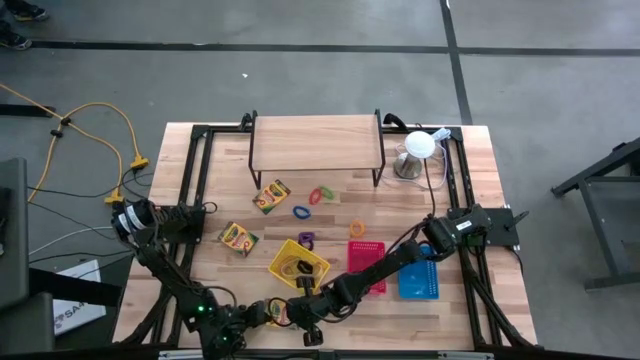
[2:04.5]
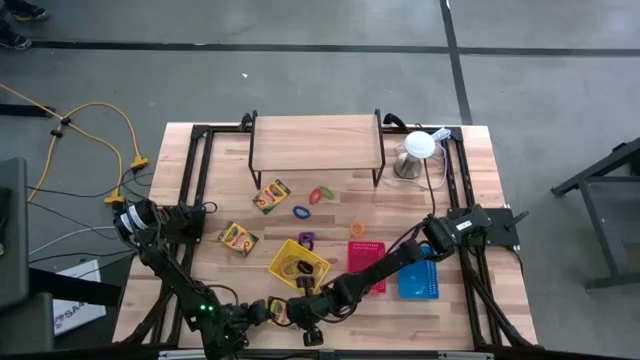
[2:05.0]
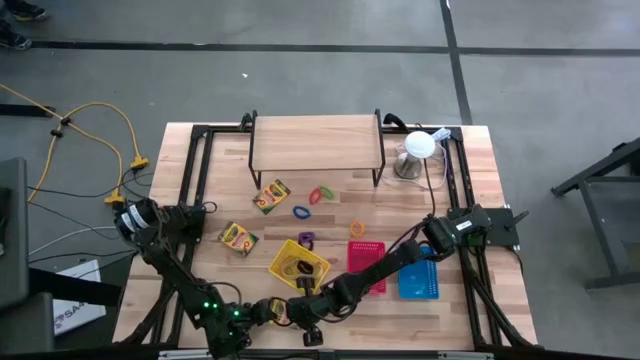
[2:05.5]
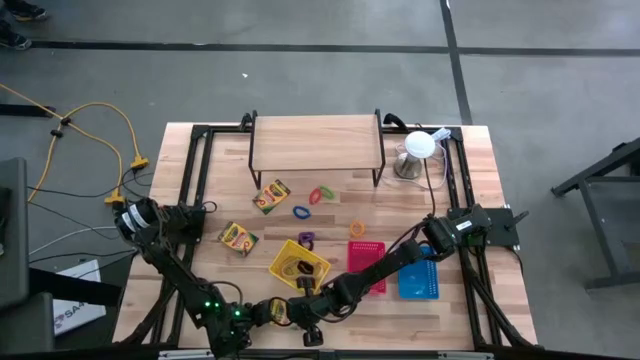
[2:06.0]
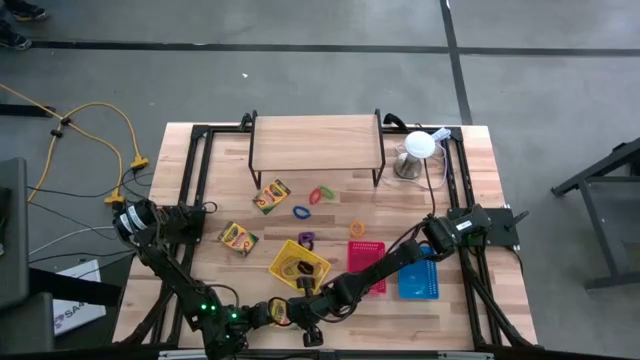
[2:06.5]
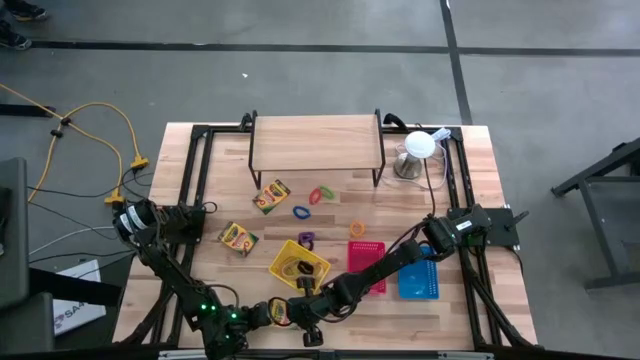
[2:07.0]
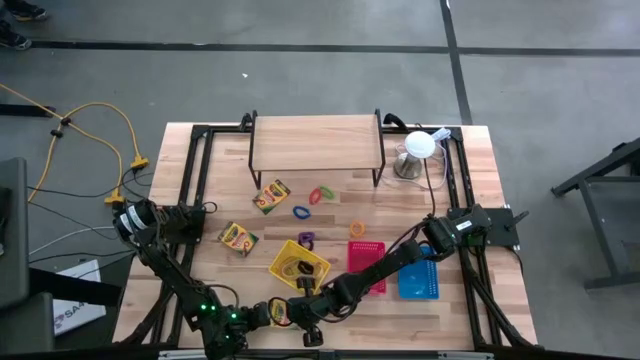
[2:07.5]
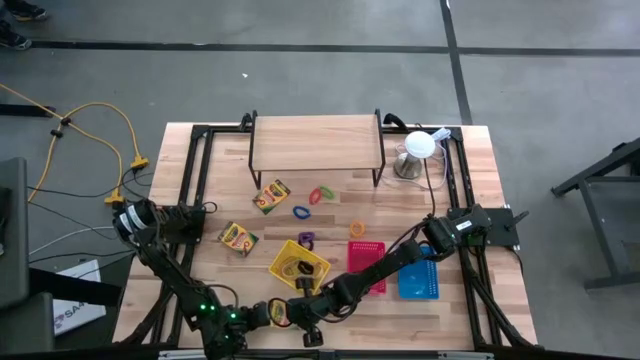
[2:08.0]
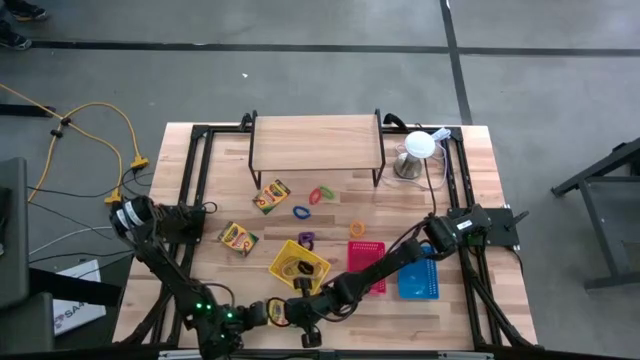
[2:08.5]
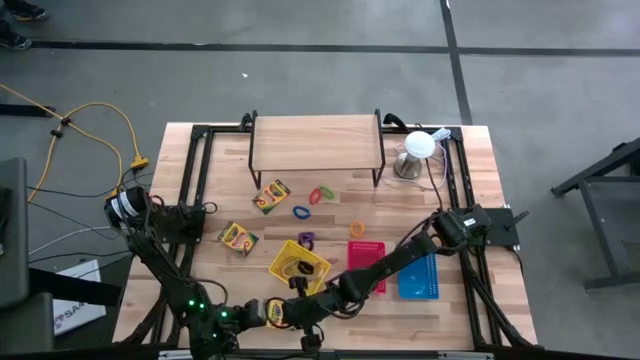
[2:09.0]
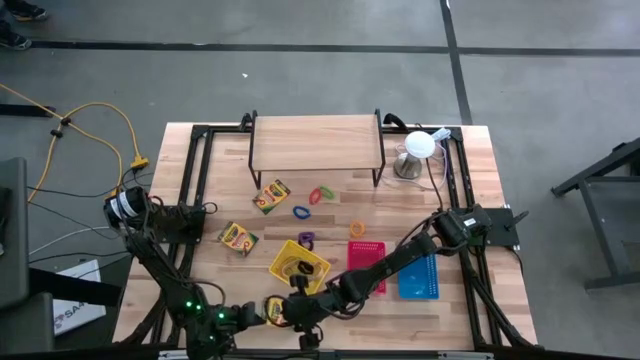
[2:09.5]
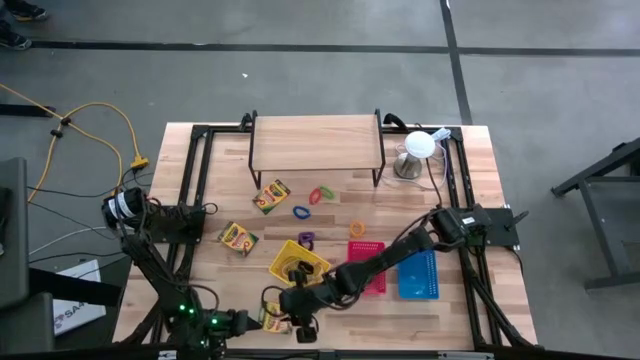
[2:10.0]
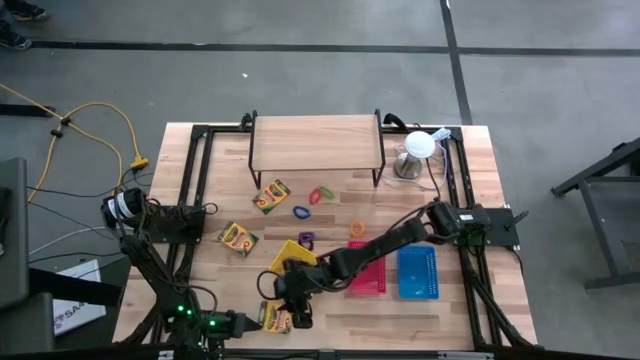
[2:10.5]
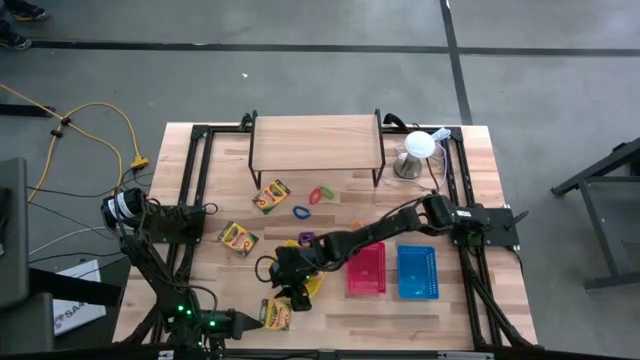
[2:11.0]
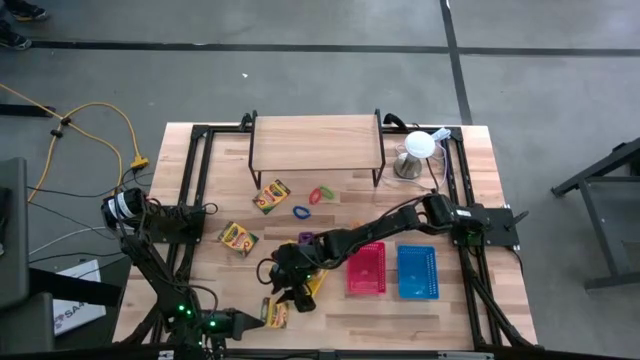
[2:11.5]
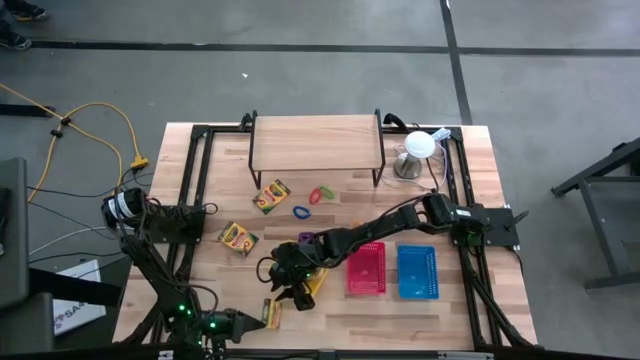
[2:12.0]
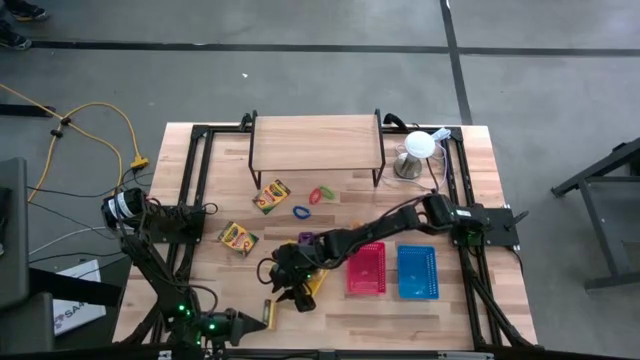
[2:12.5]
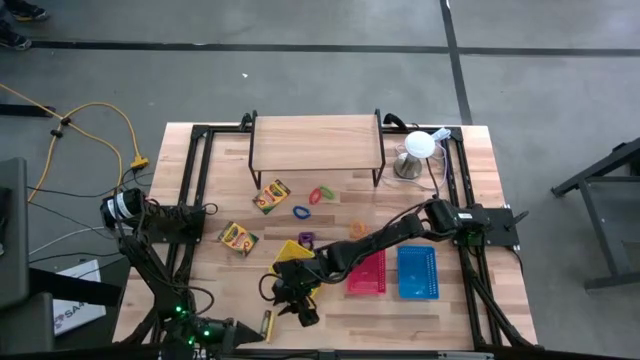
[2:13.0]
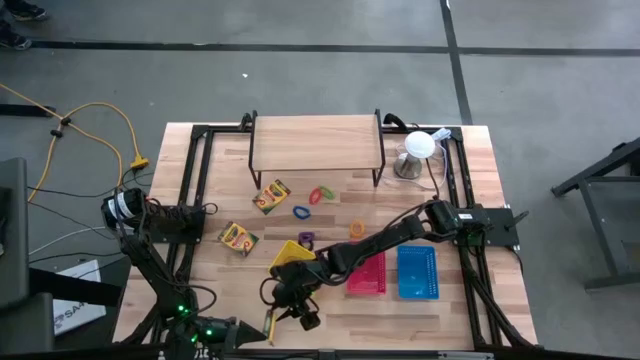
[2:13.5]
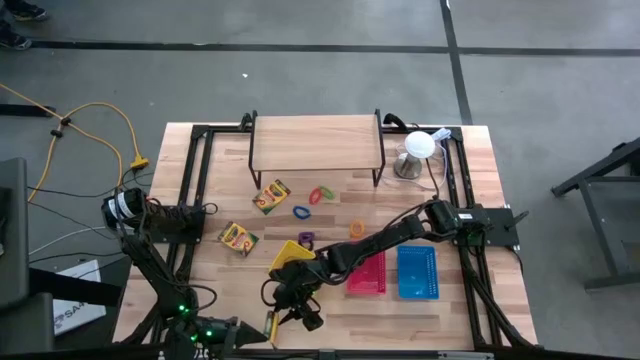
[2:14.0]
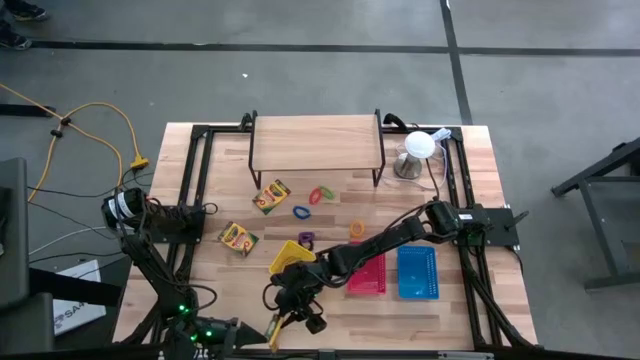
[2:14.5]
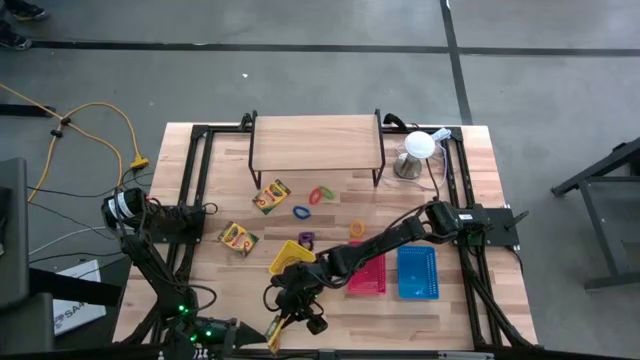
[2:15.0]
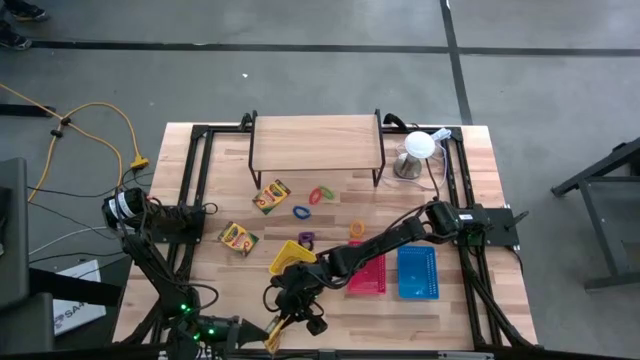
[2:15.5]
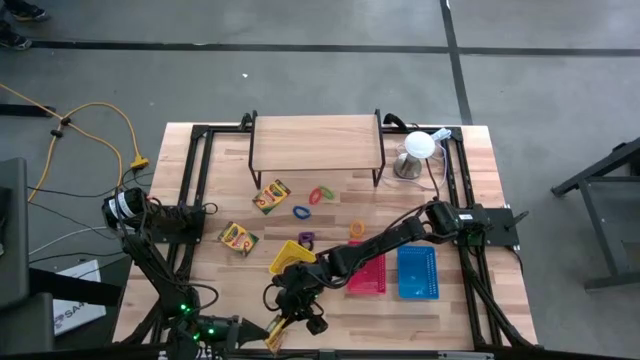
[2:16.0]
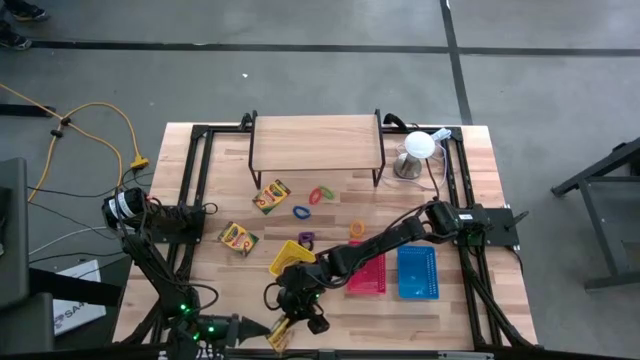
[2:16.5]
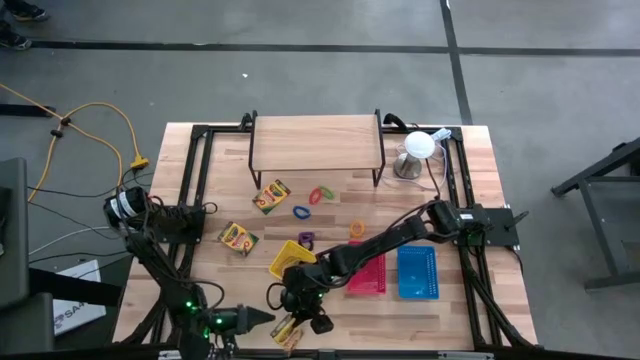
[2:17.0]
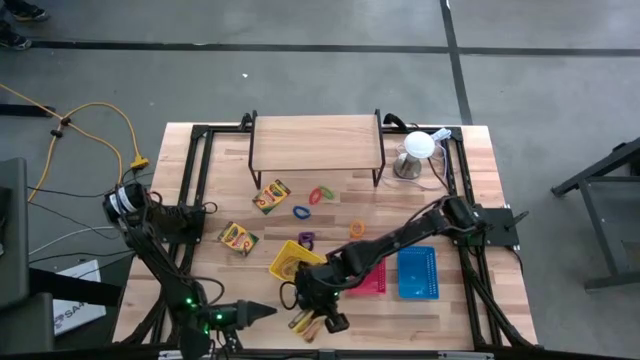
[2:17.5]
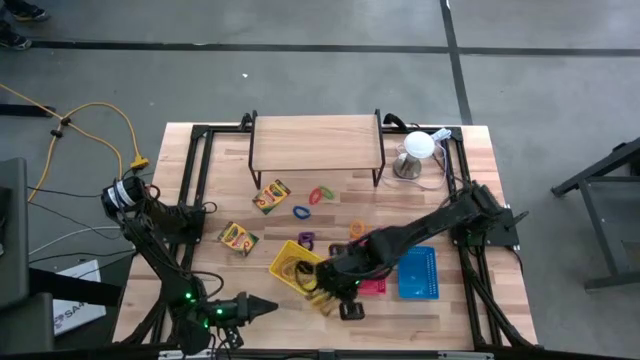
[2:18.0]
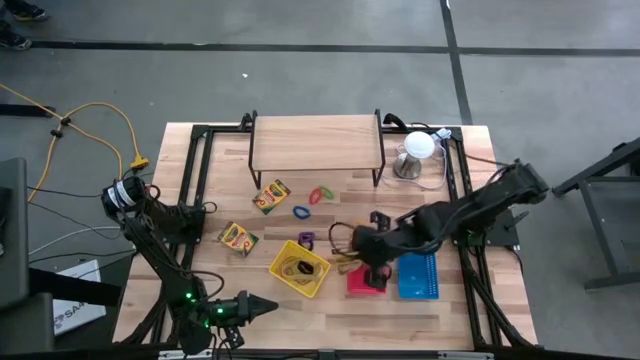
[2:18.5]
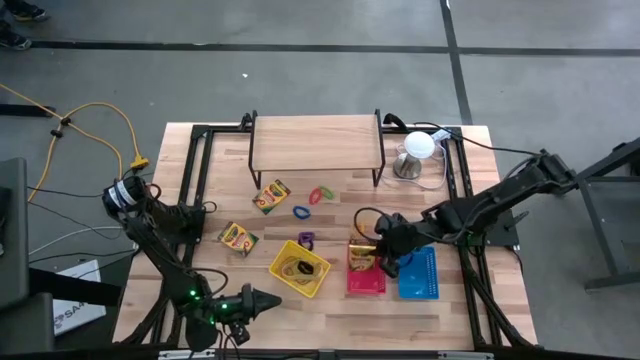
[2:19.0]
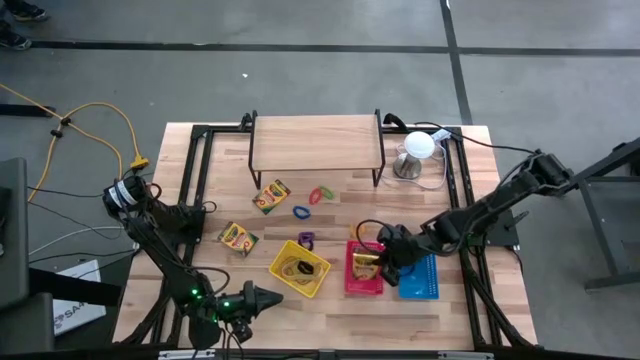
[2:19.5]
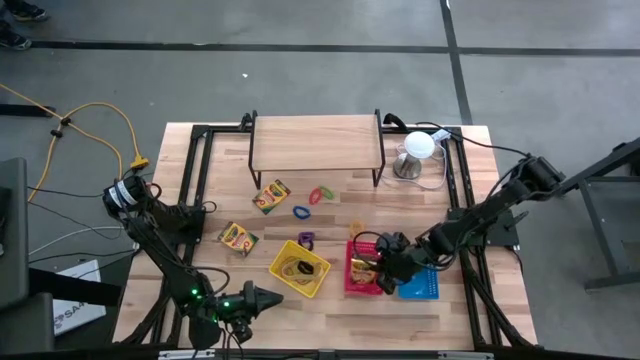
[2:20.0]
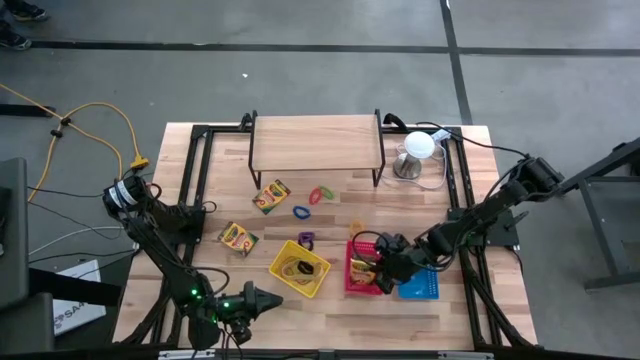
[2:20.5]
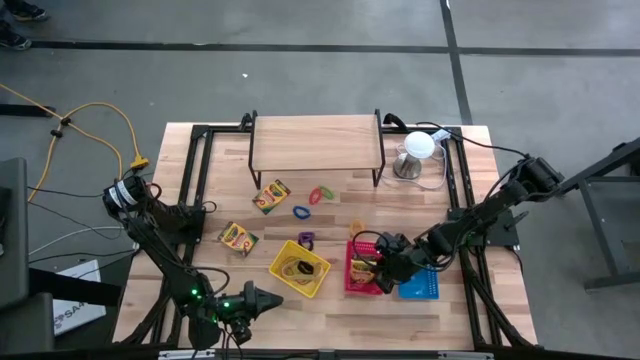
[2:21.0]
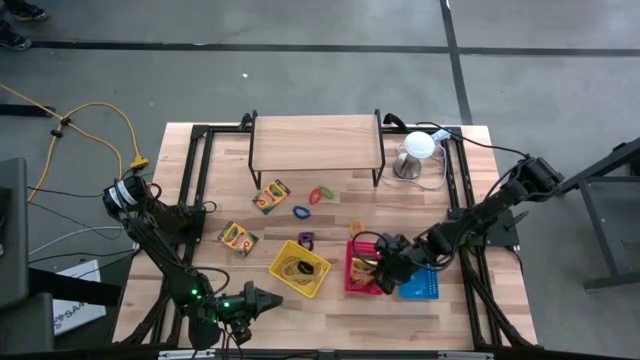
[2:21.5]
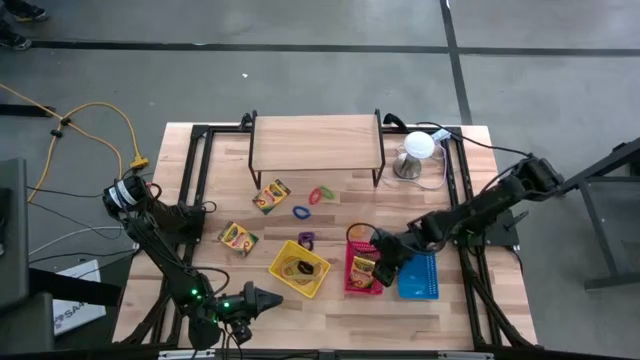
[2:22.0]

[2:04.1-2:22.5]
Task: Pick & Place Office Desk Supplies
Put the bottom crayon box into the red bin

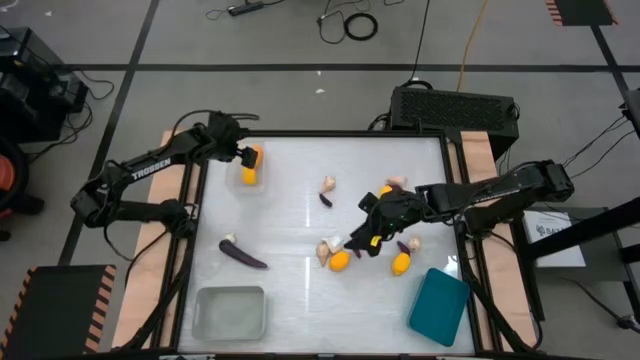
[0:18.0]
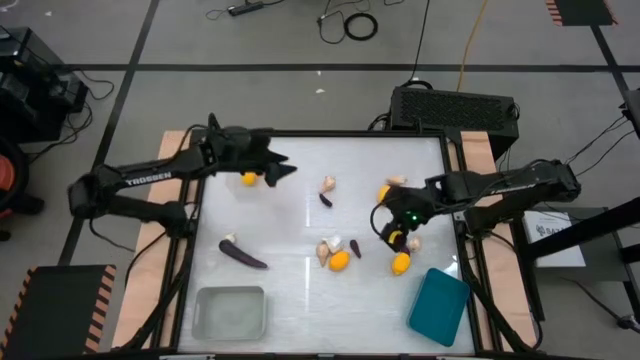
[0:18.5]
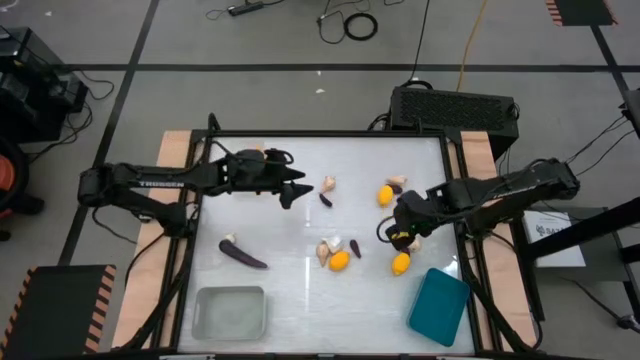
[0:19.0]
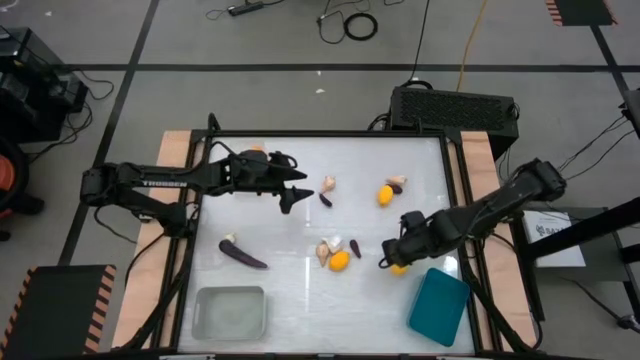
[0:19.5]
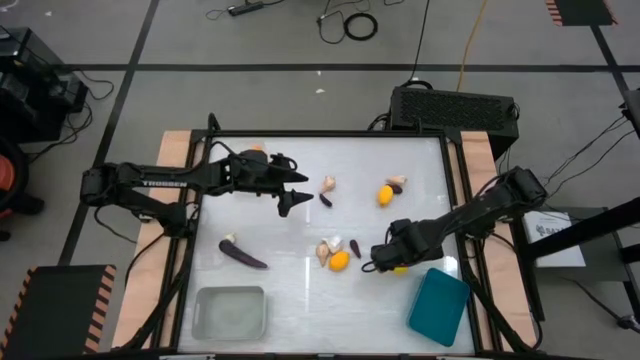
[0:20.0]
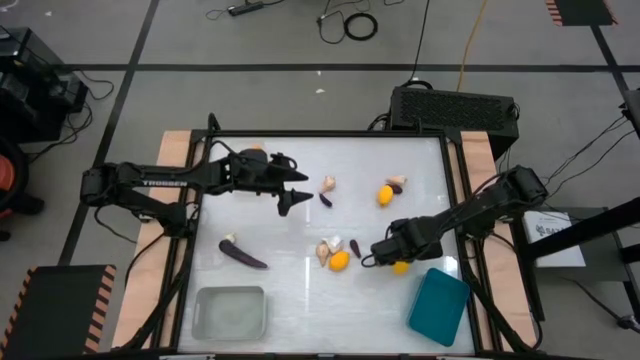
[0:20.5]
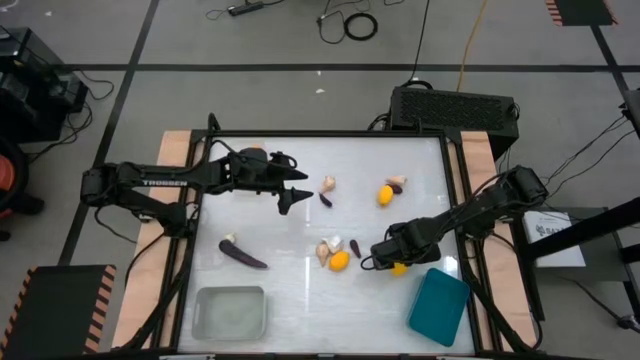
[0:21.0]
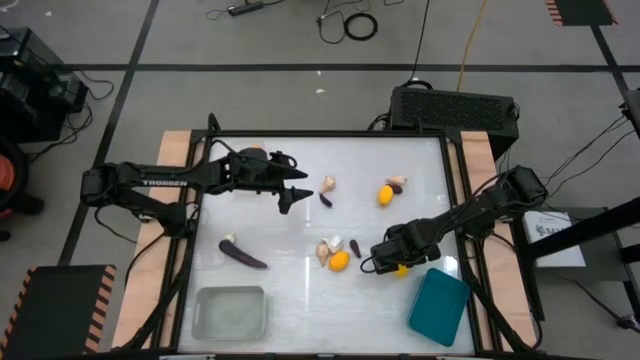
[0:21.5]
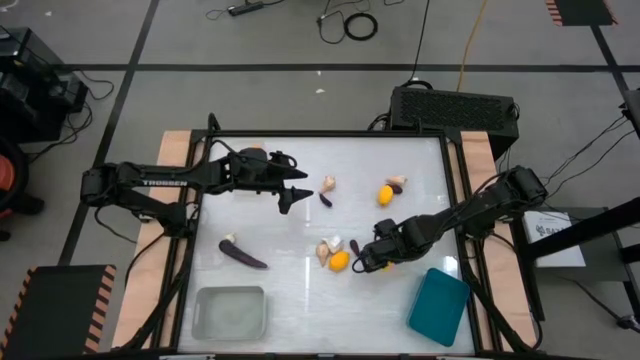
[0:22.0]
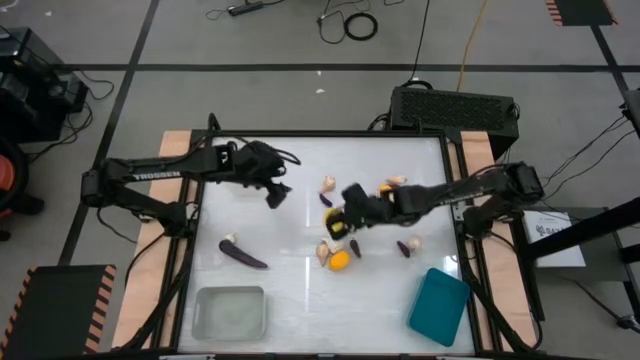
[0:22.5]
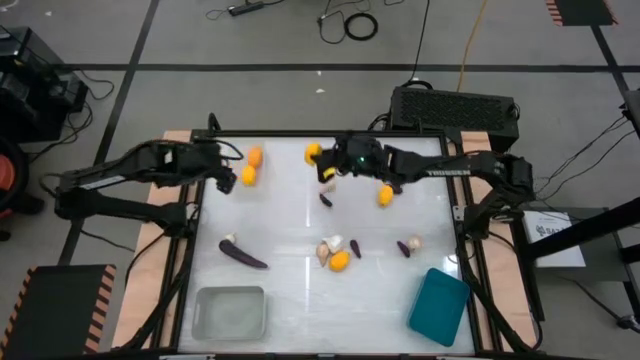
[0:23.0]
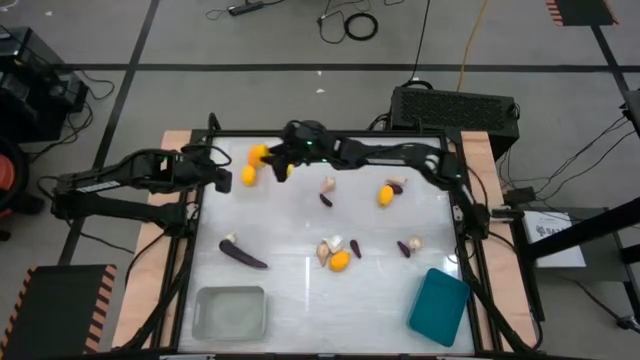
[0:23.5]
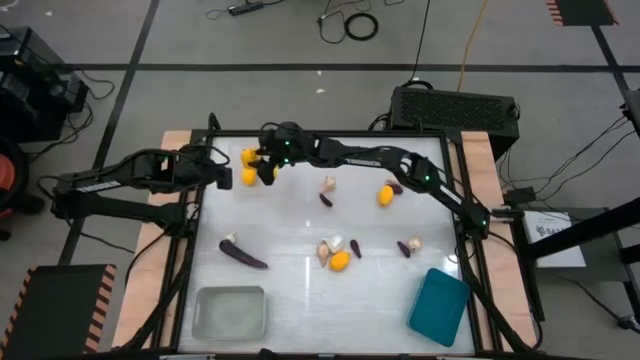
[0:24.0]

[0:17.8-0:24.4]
Task: Sort produce into baskets
Put the yellow lemon into the white bin
